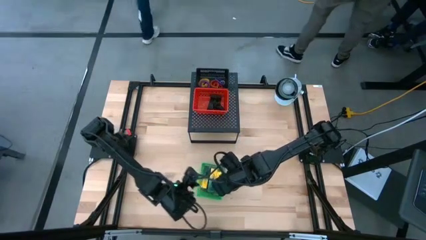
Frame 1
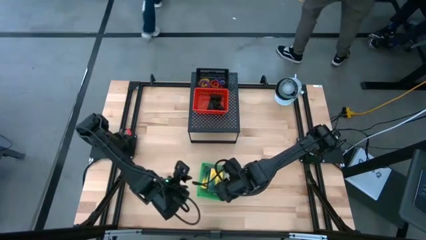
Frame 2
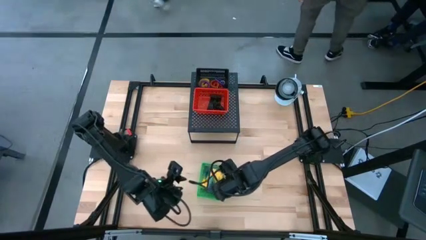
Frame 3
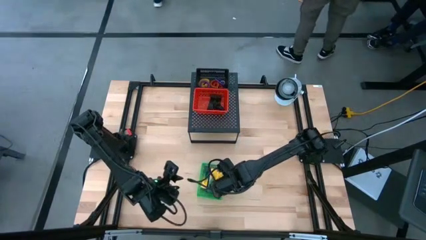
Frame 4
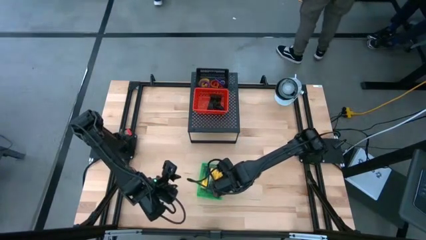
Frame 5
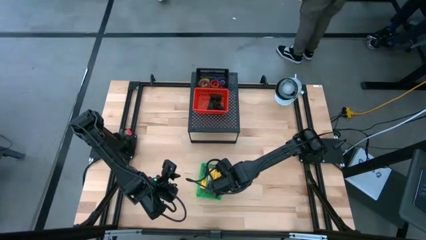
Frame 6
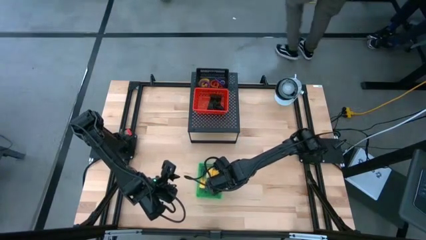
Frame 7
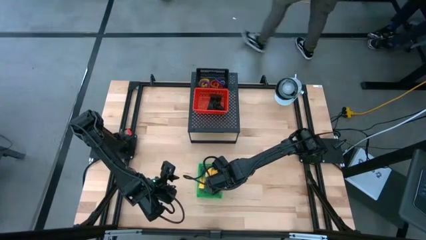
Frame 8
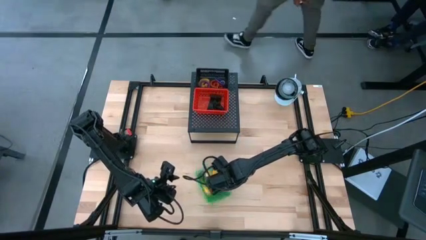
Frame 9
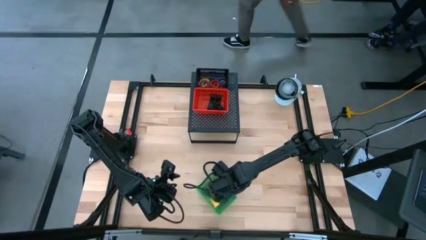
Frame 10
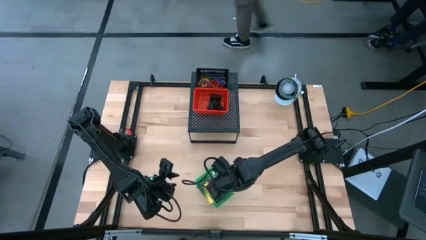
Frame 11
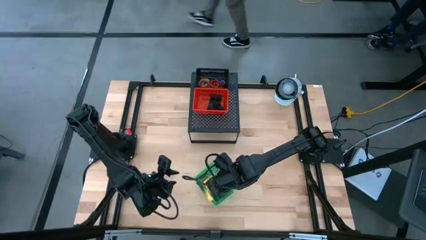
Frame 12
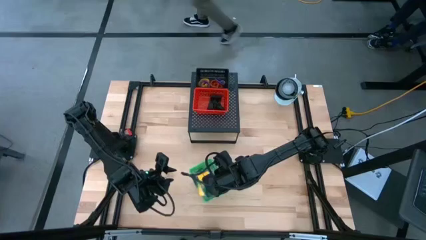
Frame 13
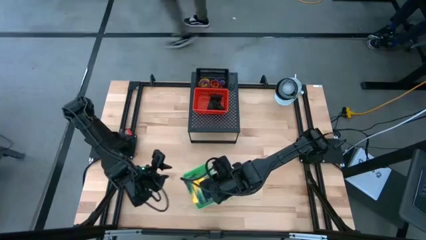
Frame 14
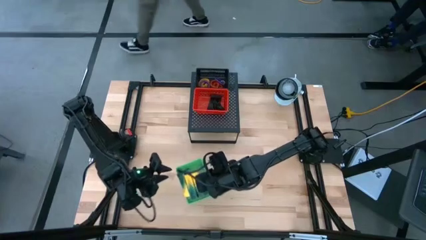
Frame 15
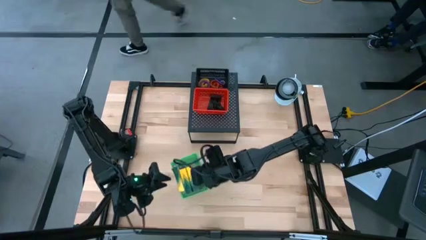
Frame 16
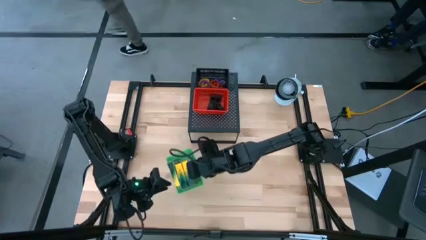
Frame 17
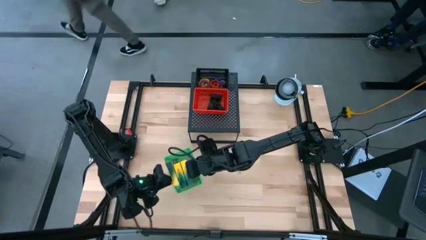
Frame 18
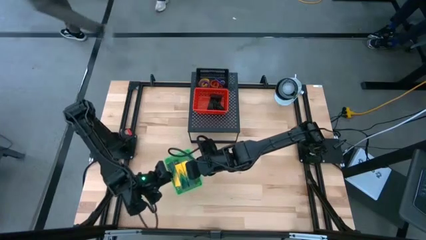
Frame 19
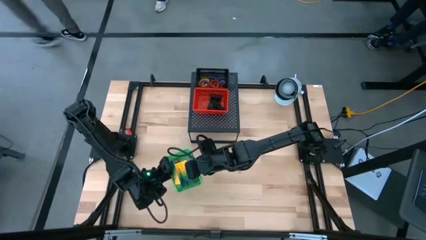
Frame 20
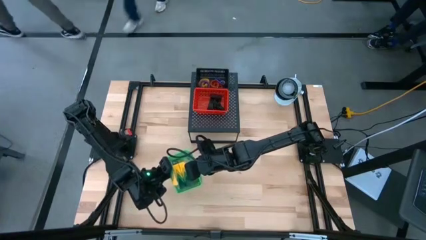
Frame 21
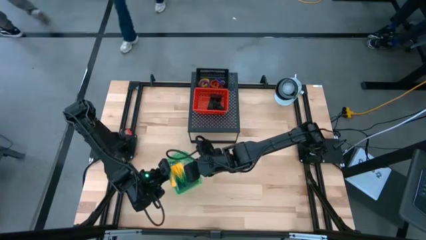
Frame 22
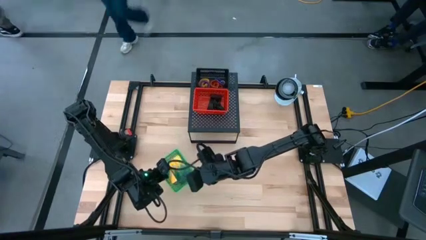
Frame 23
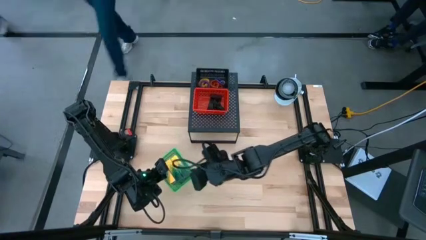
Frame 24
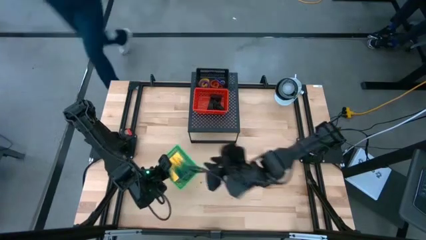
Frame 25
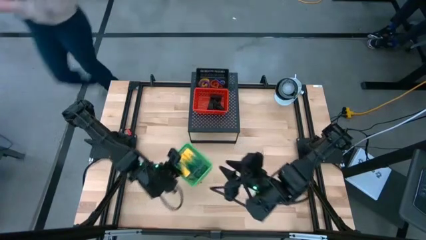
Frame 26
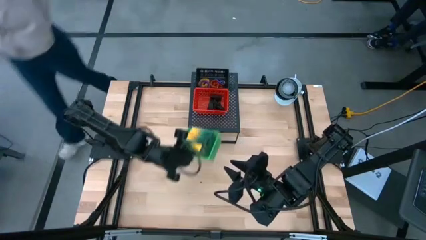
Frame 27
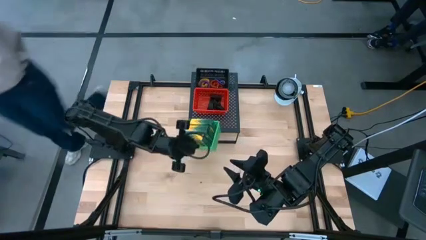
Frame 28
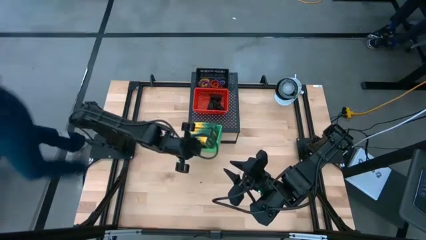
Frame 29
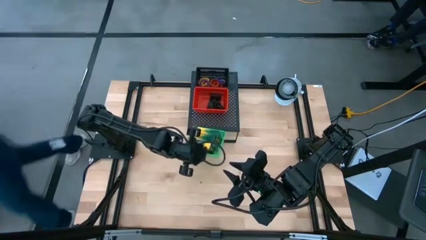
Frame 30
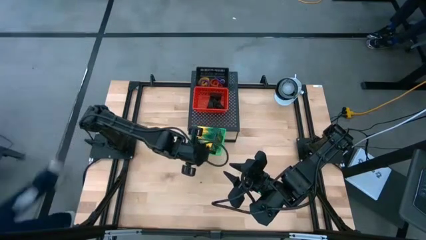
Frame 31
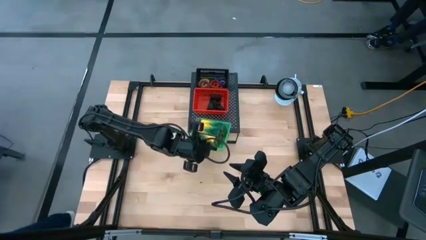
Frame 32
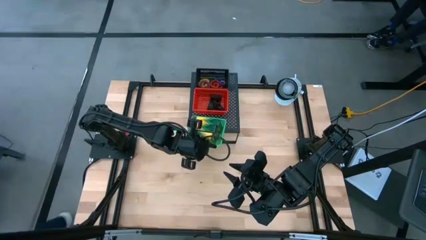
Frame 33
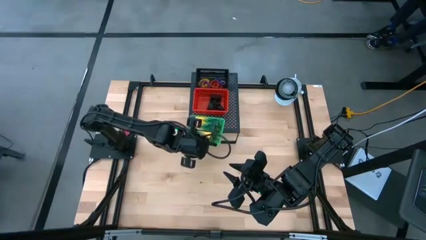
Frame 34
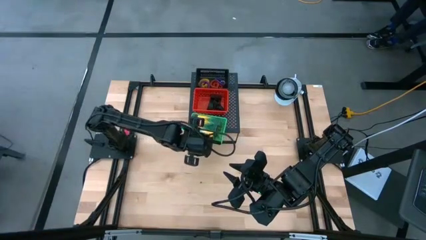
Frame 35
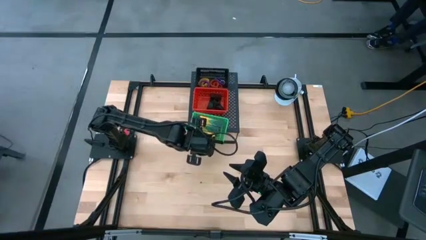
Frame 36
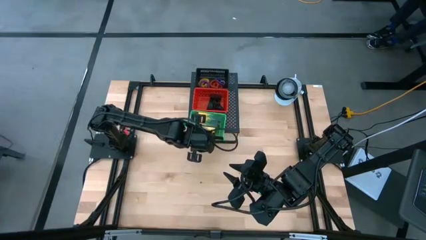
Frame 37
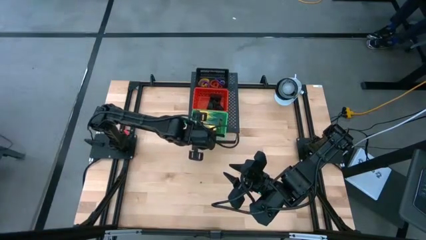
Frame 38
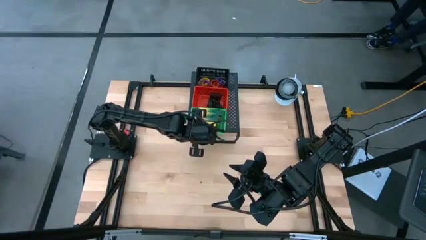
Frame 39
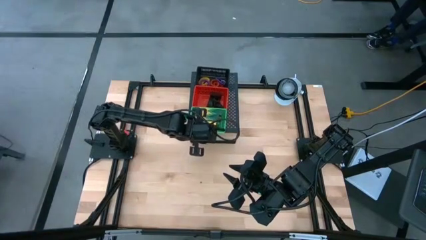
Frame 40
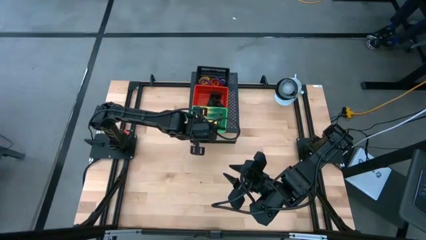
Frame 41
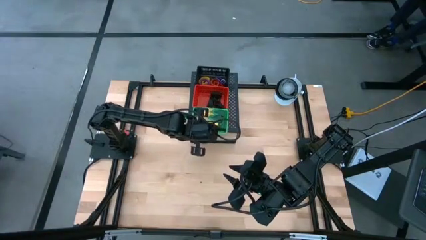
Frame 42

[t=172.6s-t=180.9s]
Task: Pick & Place Office Desk Supplies
Put the green bin on the shelf

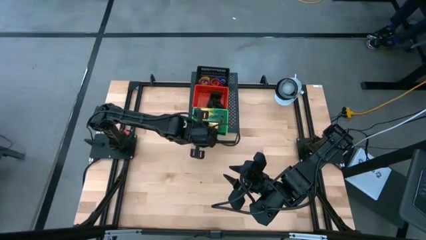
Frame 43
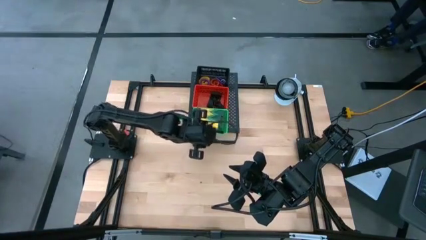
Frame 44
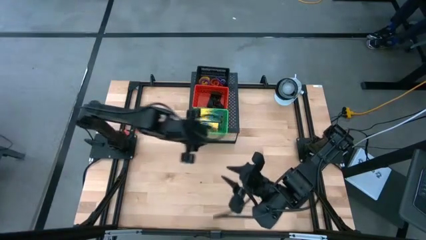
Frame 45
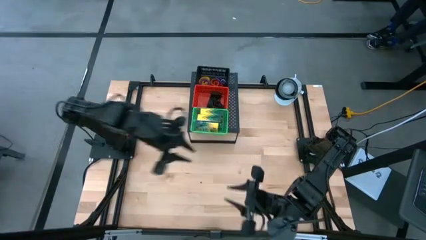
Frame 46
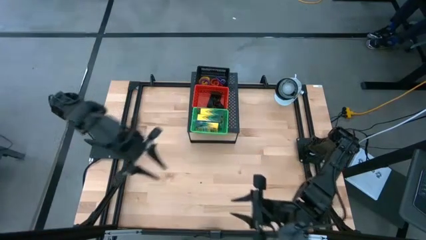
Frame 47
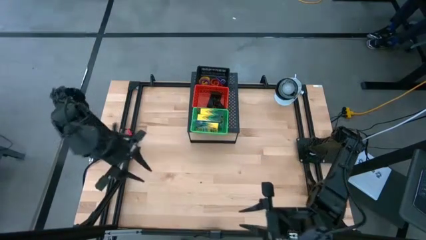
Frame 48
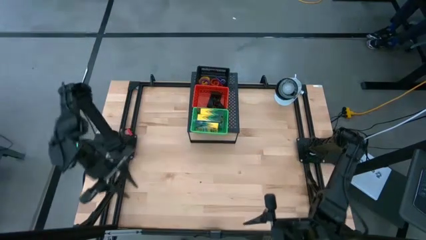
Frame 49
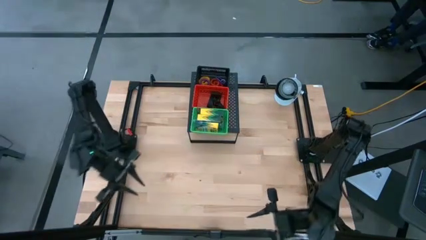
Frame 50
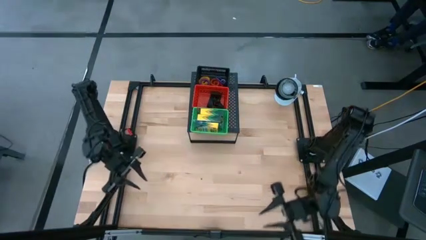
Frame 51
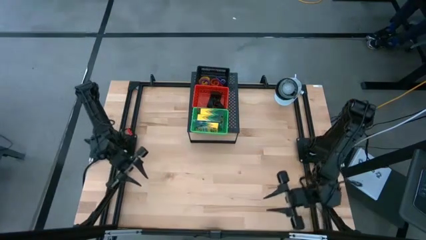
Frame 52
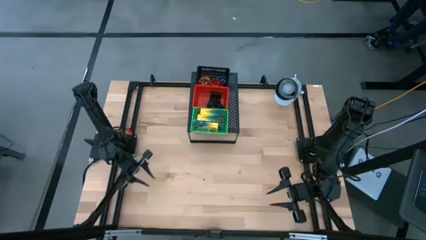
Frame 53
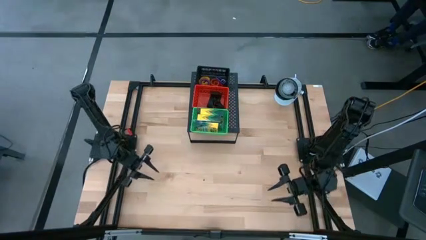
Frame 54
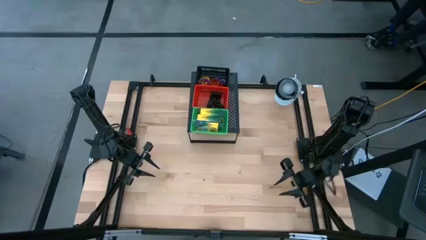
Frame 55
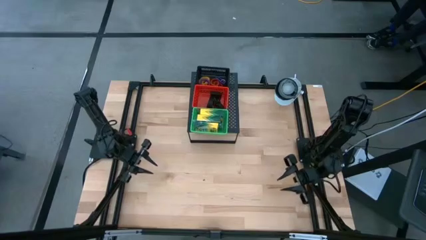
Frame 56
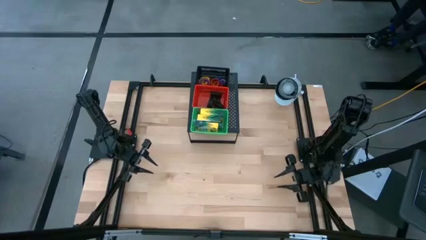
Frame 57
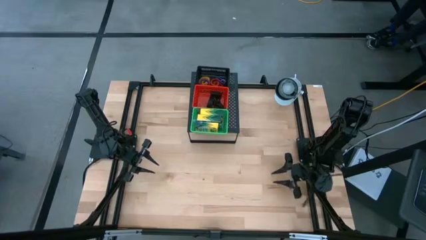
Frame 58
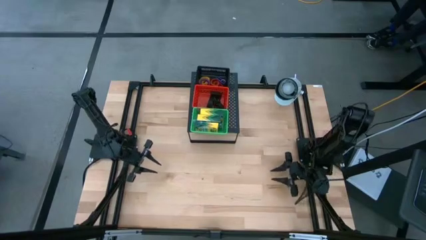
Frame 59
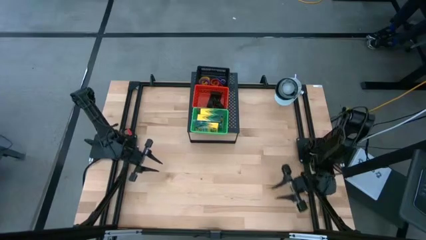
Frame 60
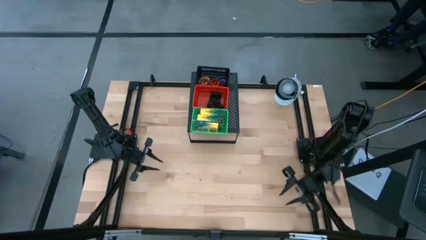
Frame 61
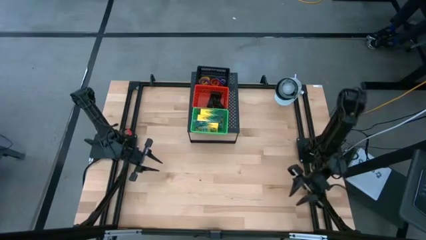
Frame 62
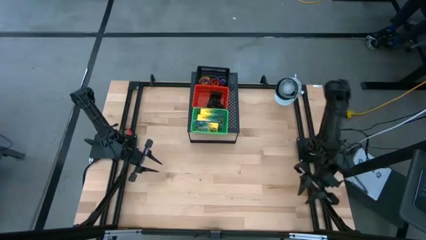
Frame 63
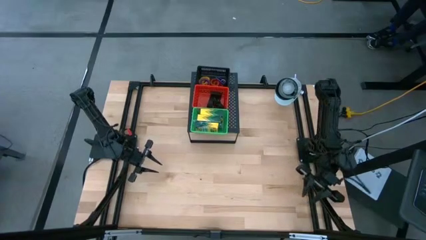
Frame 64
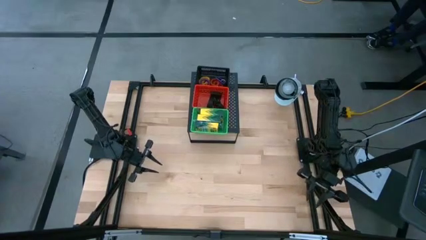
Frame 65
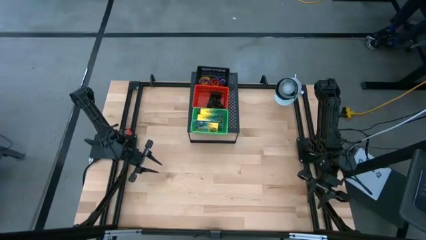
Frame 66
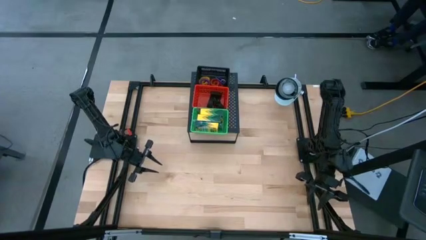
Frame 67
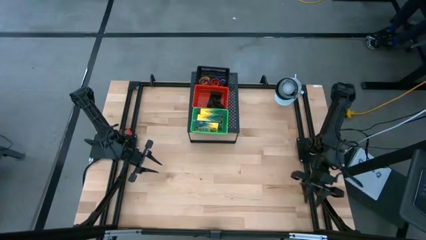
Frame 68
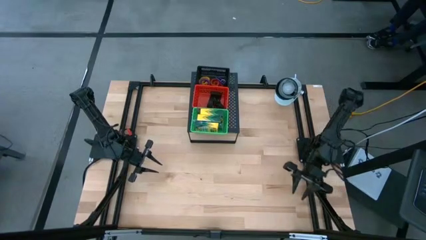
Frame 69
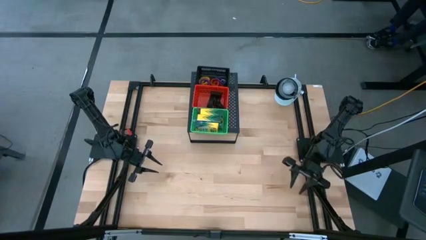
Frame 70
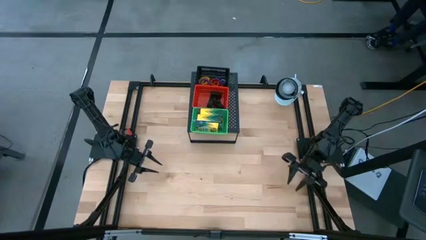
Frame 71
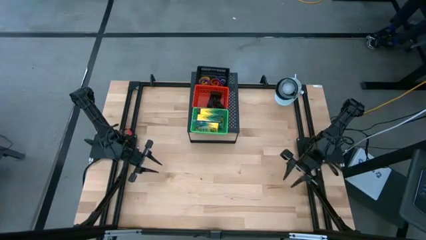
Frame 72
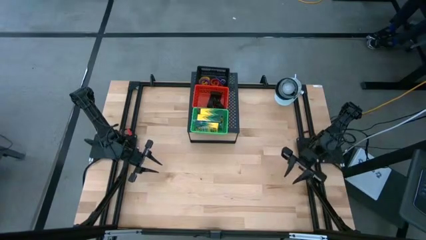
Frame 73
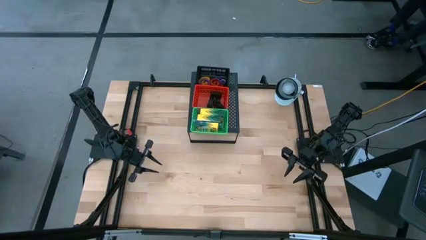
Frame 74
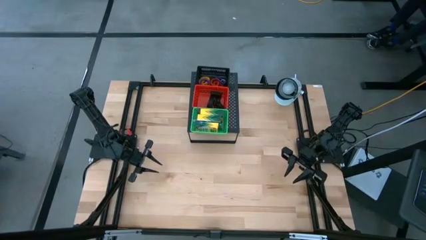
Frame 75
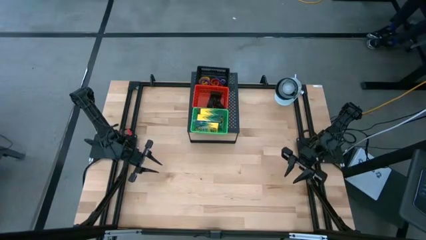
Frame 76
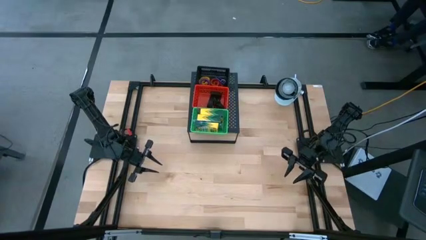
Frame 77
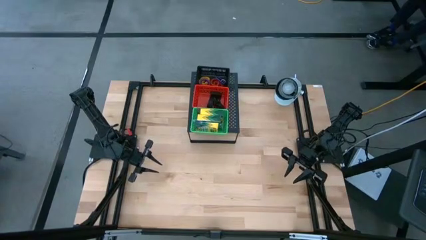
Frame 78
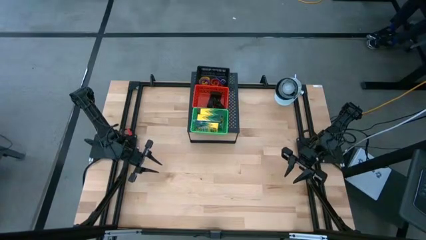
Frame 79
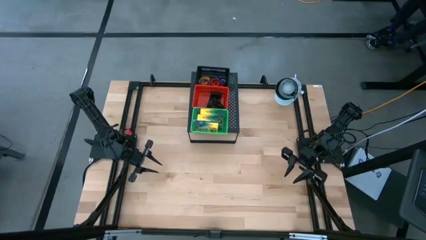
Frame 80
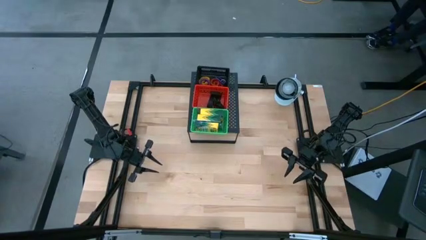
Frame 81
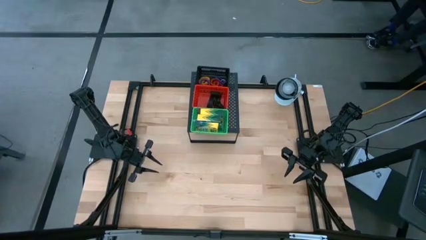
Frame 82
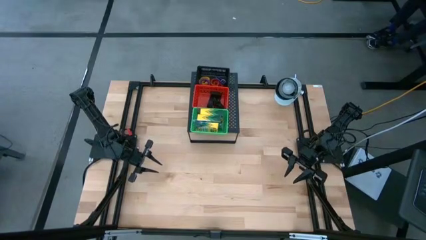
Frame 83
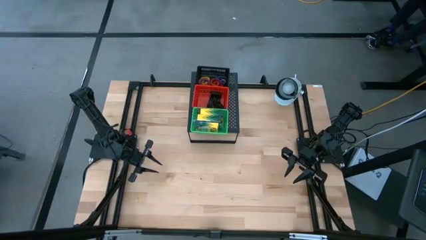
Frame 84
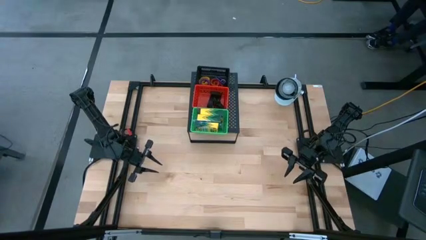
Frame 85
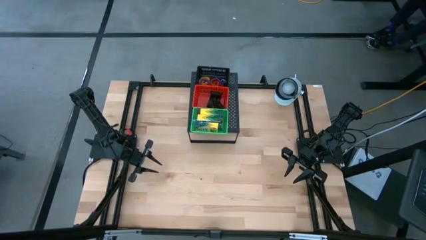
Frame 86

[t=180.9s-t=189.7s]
Return to Home Position
